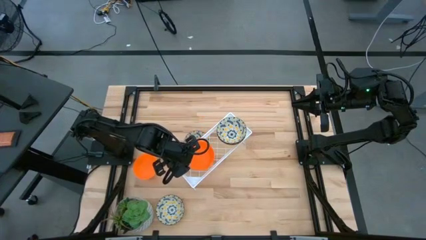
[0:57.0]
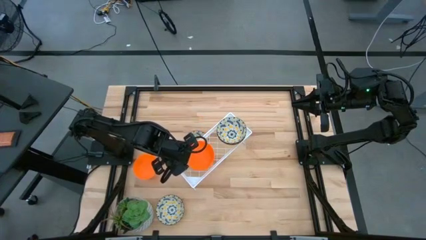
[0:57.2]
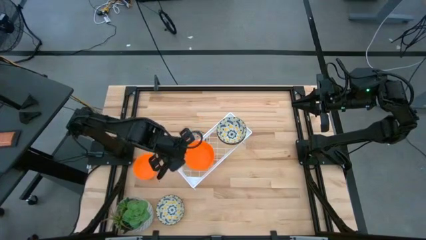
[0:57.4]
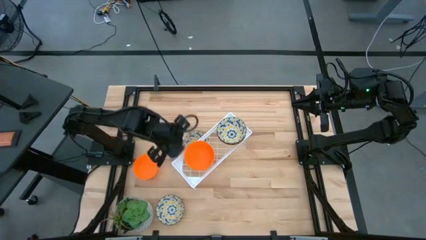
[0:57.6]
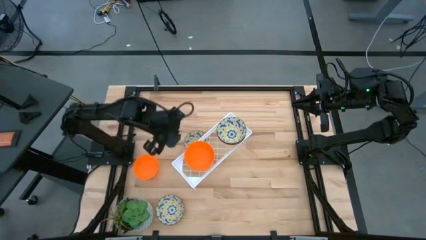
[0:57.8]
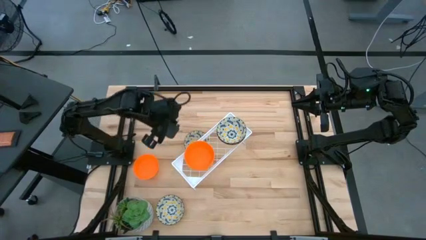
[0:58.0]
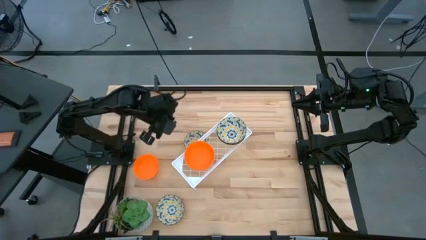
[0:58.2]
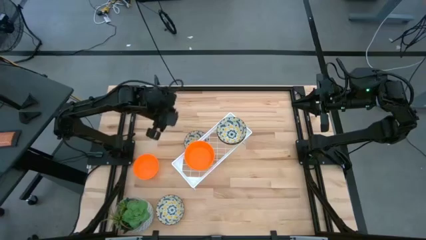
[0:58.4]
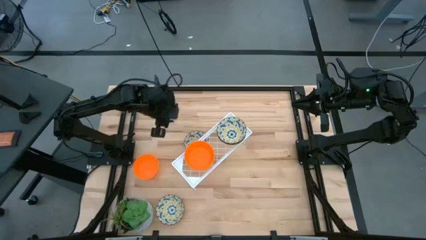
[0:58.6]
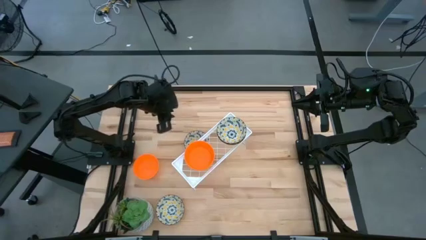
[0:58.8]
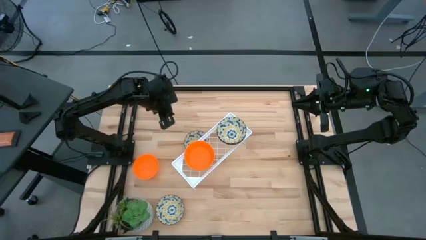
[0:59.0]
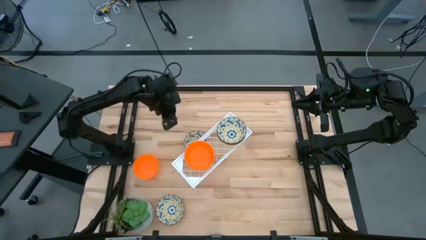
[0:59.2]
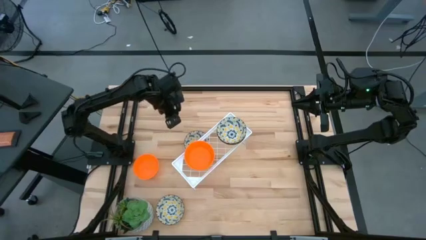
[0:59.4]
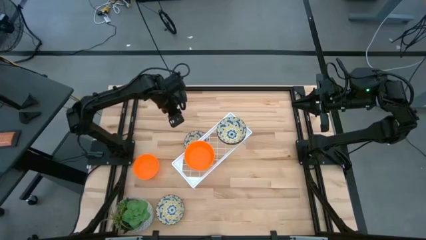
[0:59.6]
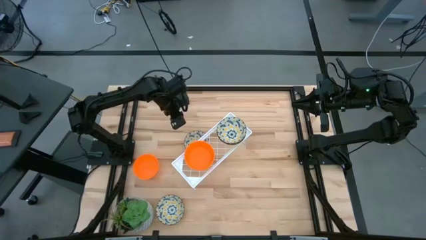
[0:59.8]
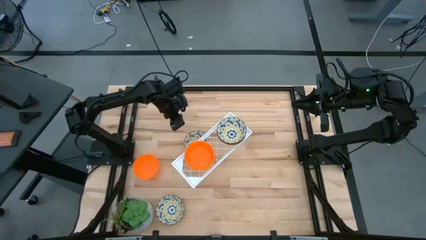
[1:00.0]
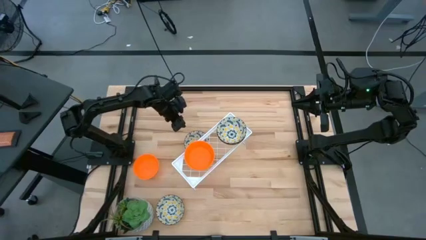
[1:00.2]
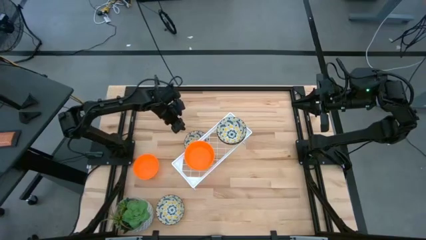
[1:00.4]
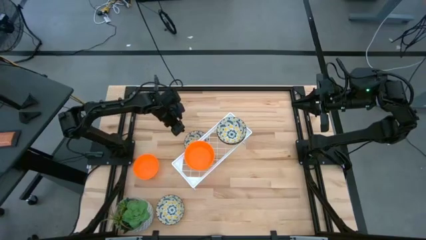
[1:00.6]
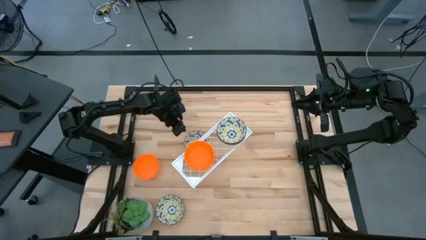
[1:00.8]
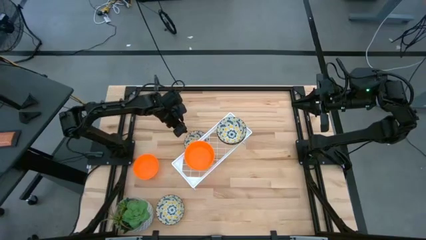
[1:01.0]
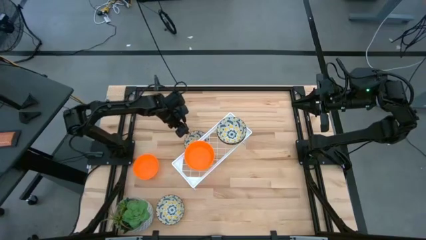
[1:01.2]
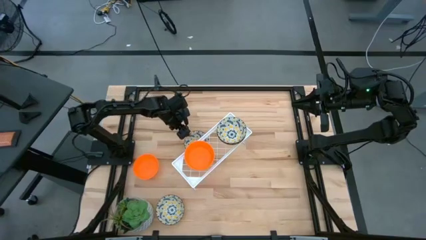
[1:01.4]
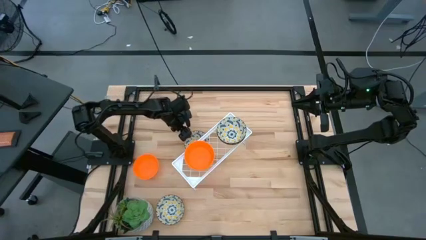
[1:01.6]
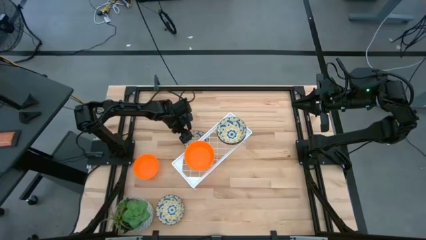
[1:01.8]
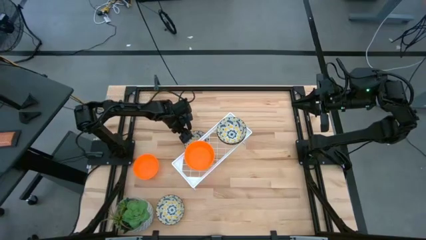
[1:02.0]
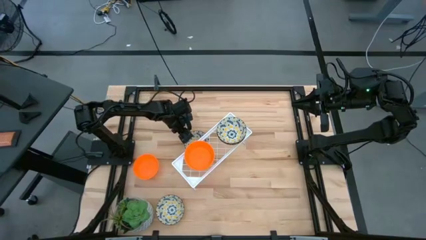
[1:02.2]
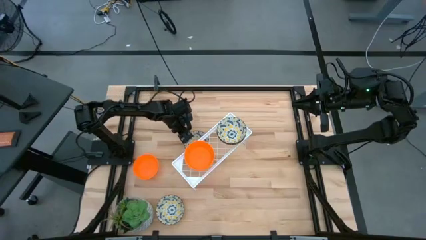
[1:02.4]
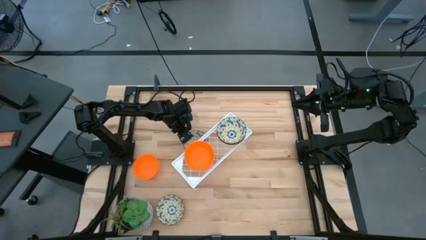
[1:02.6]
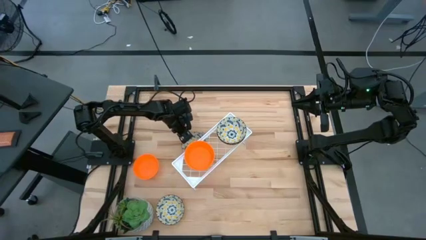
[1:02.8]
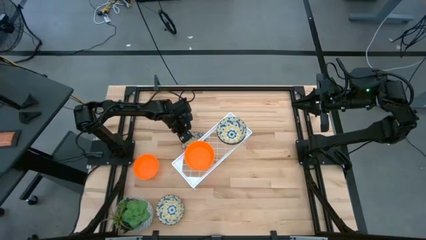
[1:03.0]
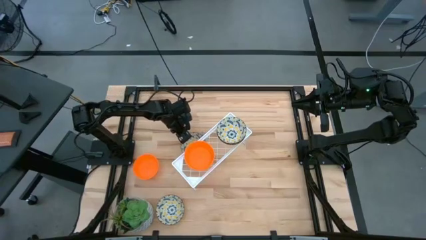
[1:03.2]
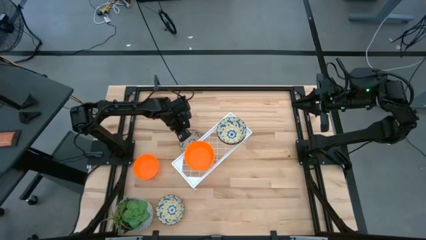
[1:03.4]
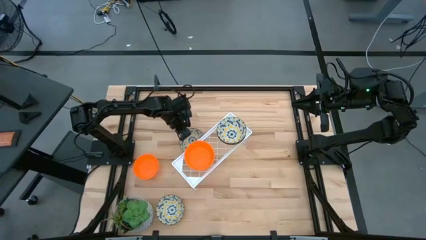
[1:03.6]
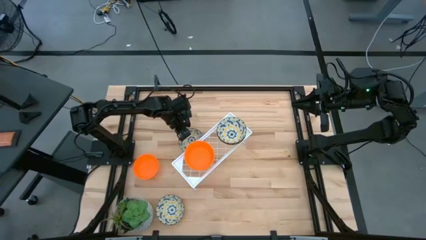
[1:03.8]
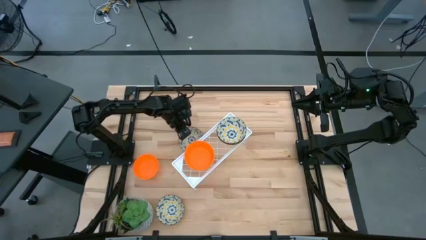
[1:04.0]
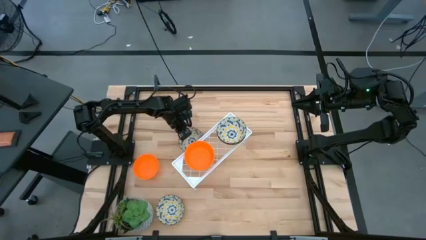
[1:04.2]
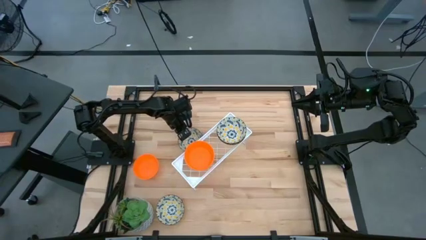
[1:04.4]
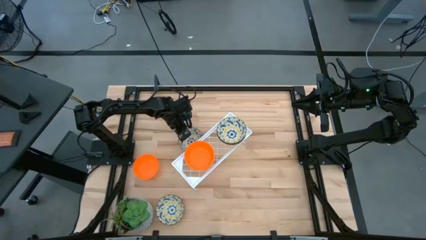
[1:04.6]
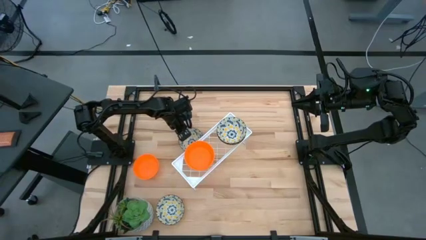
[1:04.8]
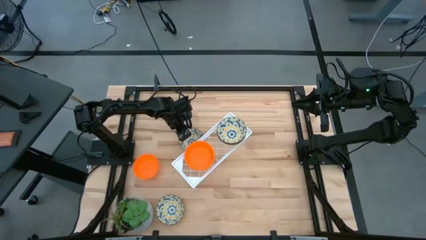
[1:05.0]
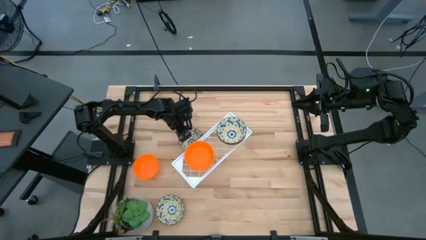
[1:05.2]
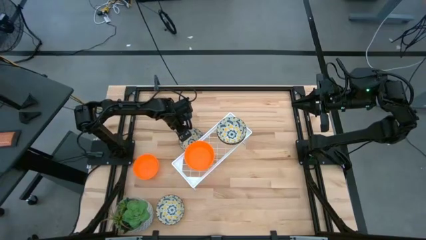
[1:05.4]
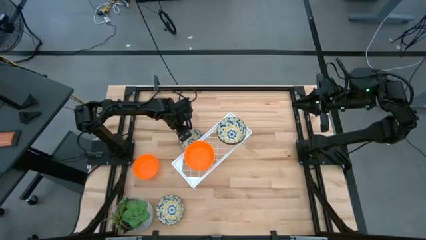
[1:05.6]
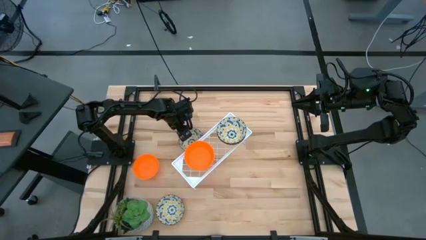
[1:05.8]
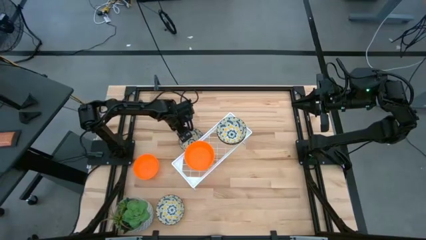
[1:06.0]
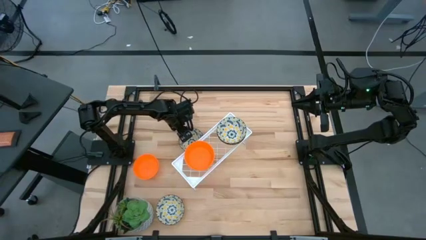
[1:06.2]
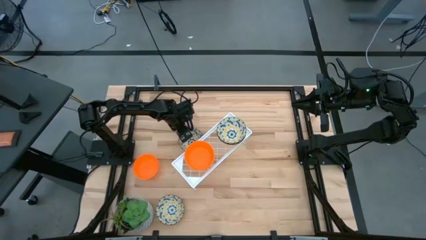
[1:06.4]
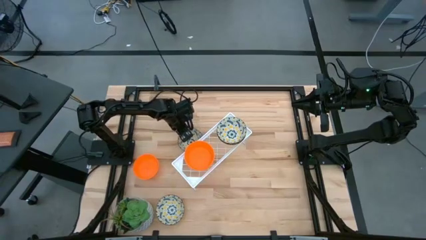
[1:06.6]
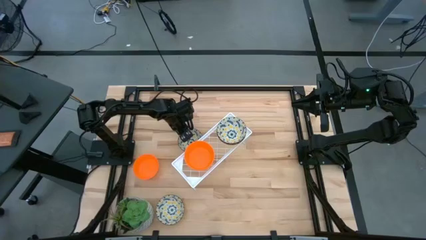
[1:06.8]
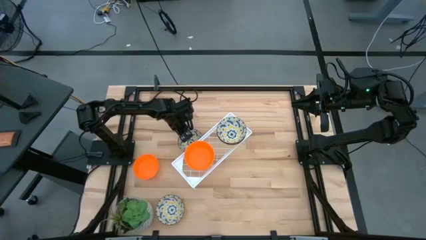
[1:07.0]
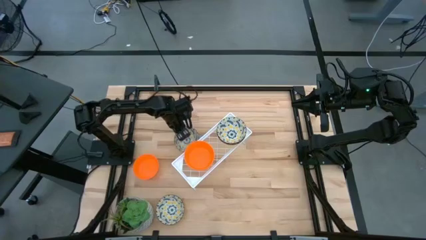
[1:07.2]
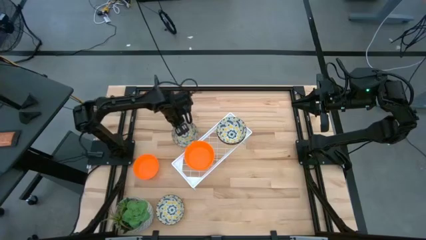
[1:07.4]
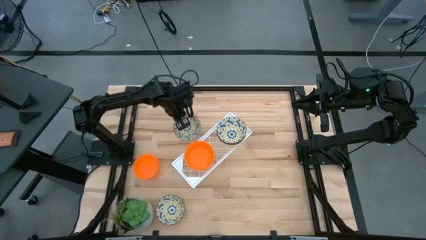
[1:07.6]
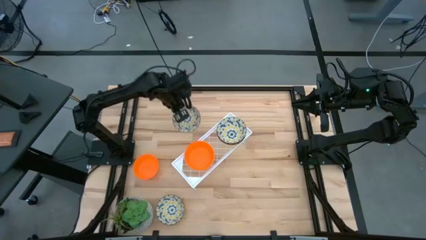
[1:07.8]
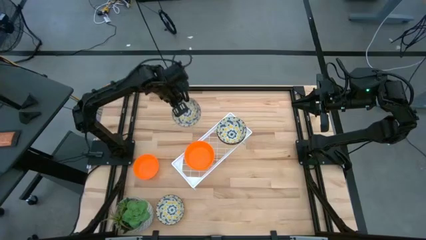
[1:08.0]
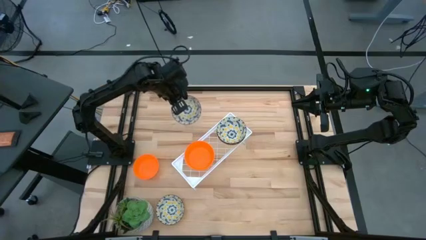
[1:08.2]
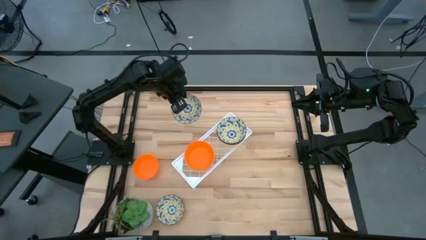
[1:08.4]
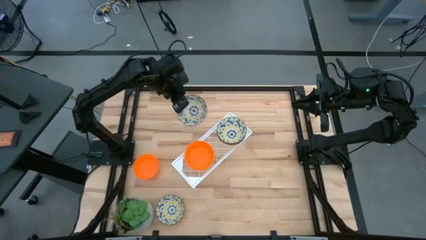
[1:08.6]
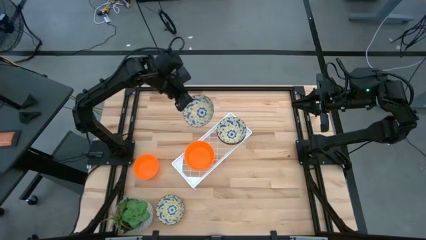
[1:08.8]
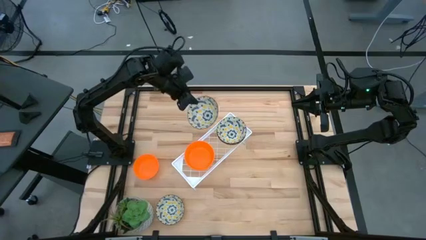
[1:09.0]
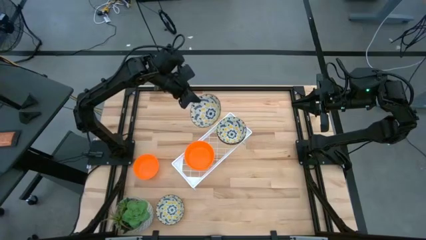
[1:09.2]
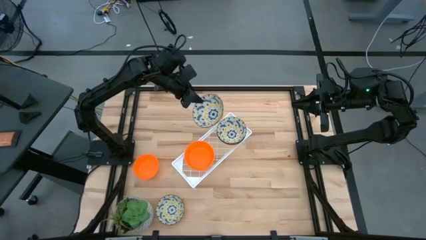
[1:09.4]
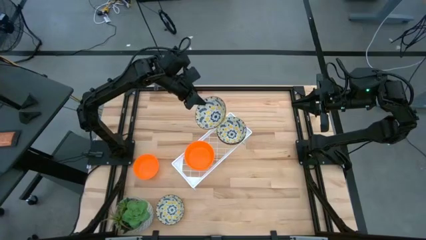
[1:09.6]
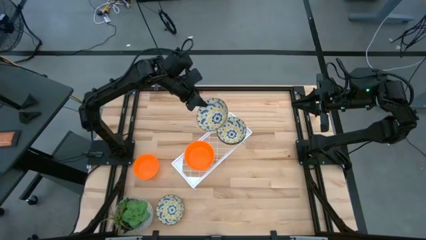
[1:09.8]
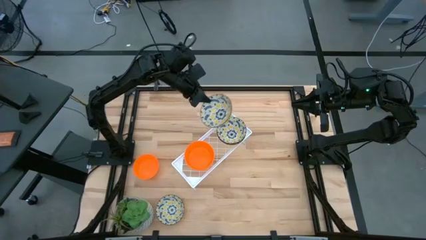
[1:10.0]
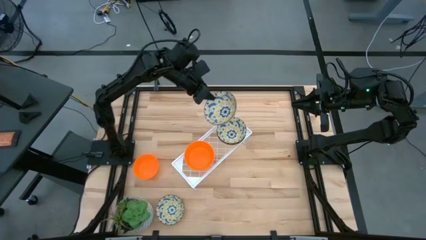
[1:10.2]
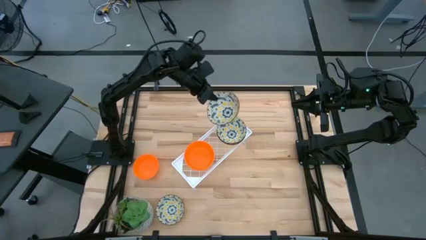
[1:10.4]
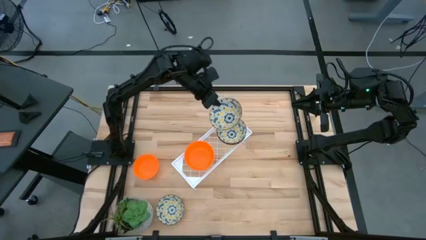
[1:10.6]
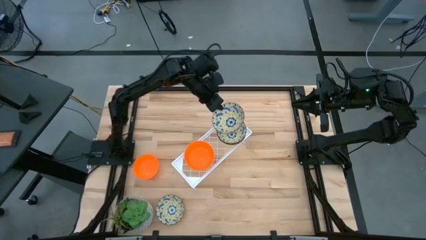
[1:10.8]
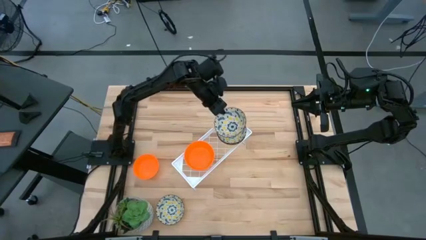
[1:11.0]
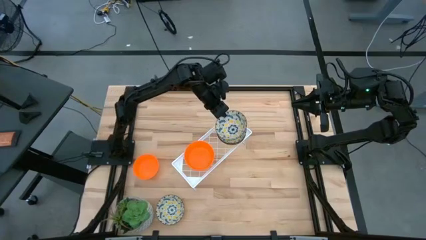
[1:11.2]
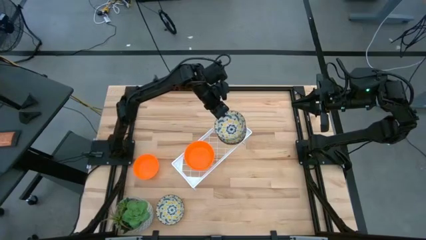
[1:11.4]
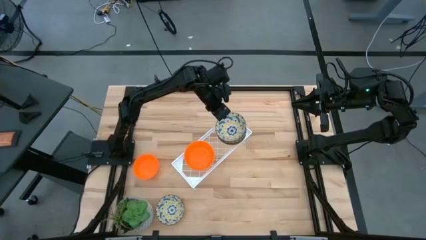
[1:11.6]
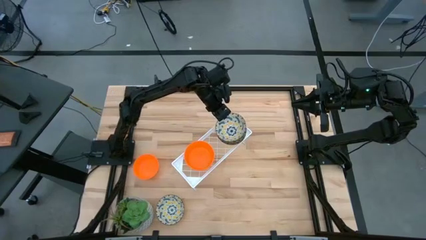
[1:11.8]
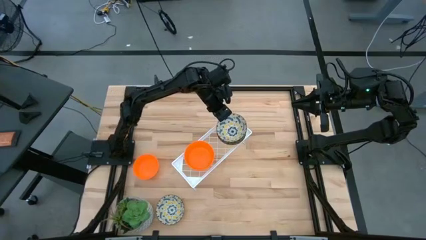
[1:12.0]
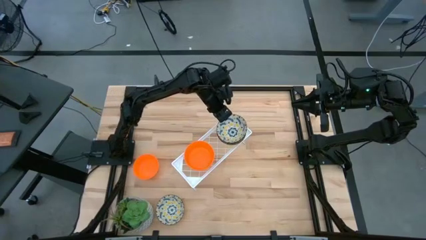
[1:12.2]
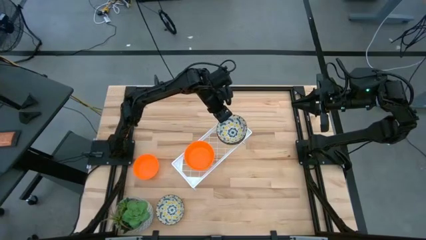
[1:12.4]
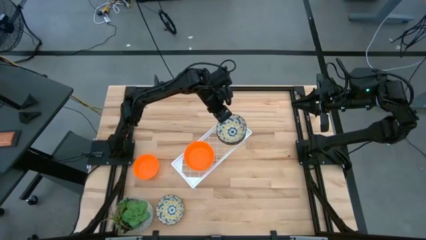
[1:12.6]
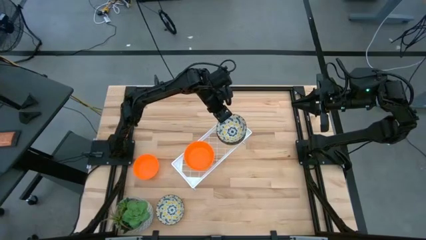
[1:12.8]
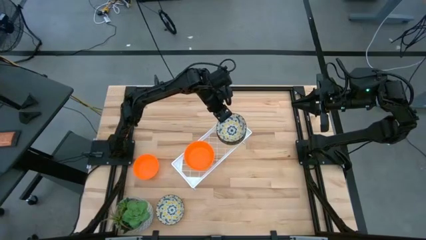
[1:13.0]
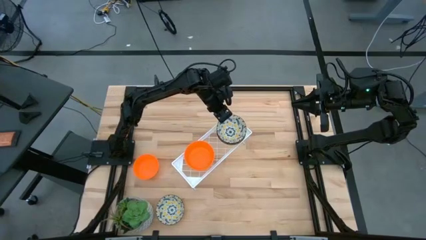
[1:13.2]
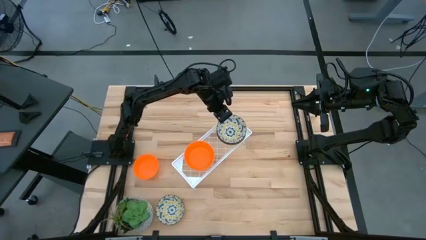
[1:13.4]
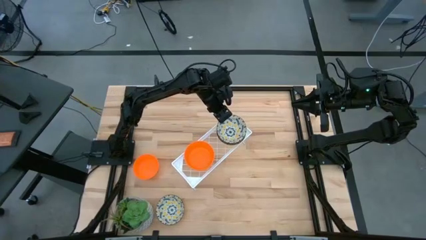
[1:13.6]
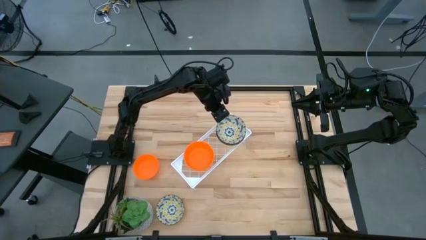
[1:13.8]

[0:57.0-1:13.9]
Task: Pick & Place Mini bowls
Stack the yellow patterned bowl on top of the yellow patterned bowl on the shelf
